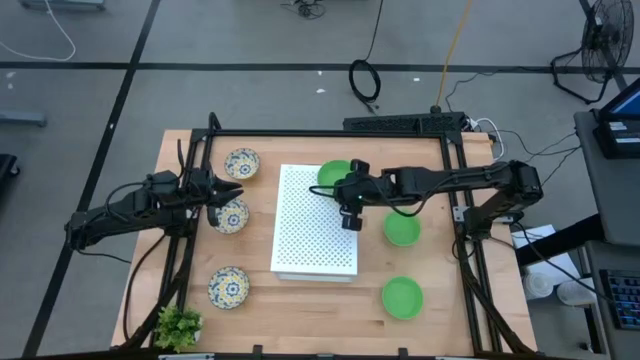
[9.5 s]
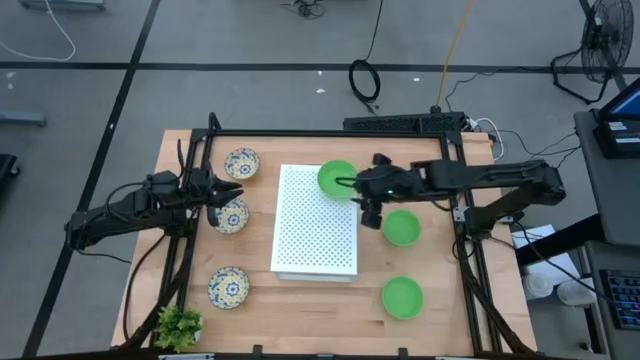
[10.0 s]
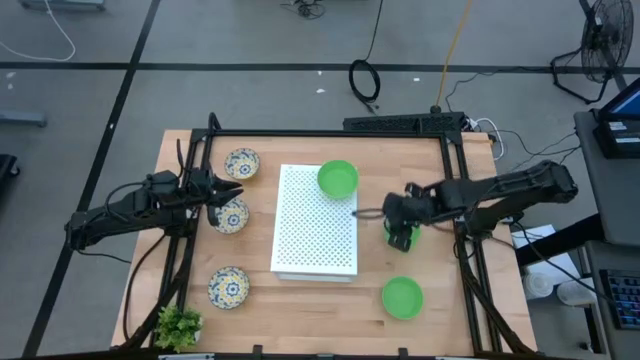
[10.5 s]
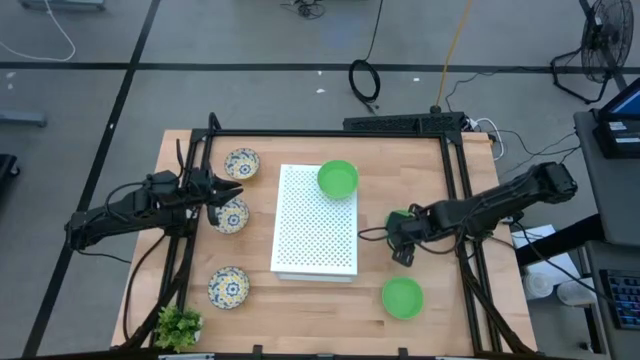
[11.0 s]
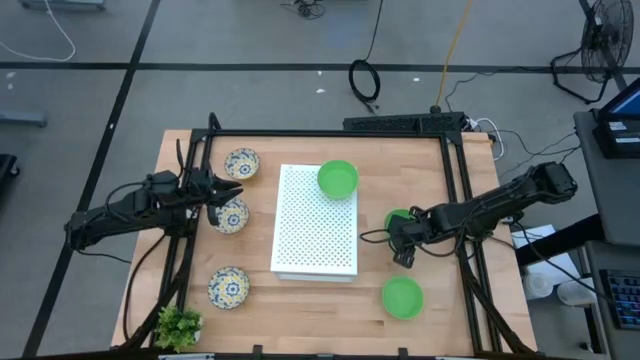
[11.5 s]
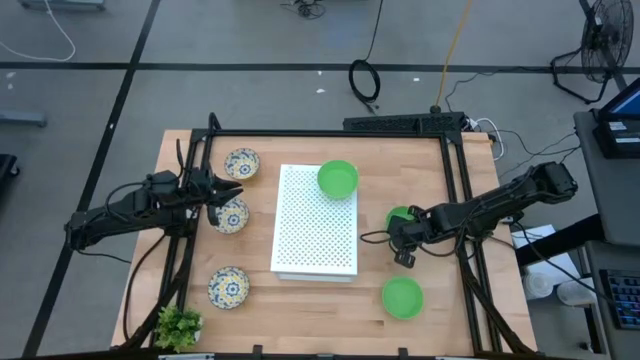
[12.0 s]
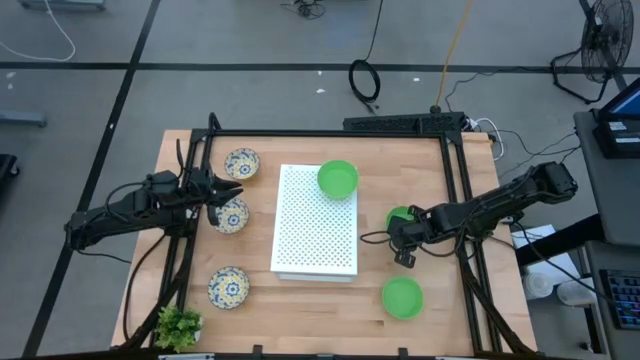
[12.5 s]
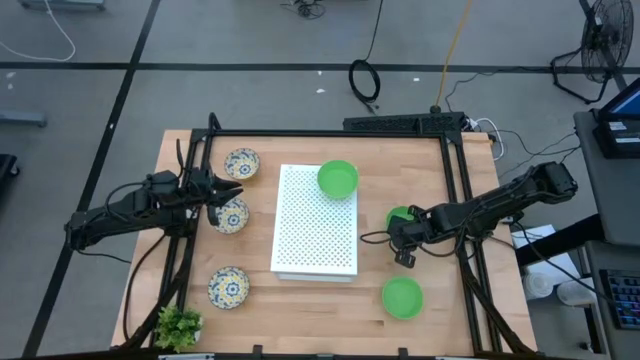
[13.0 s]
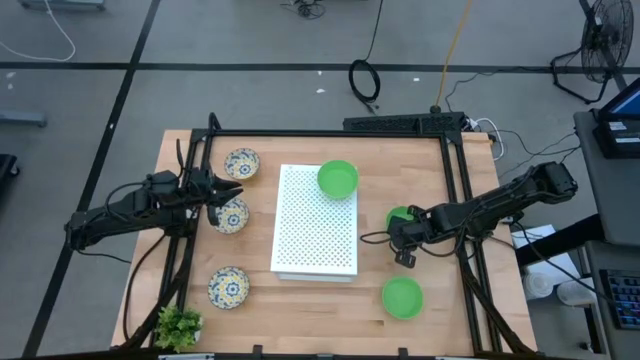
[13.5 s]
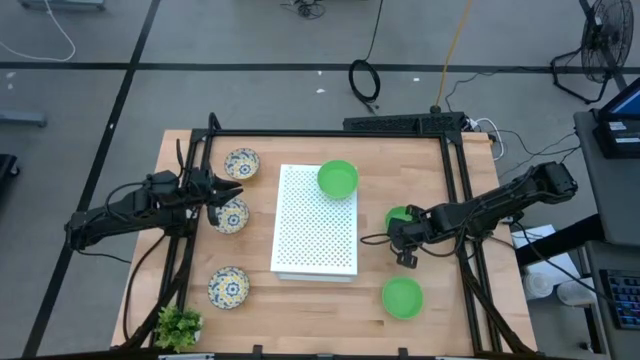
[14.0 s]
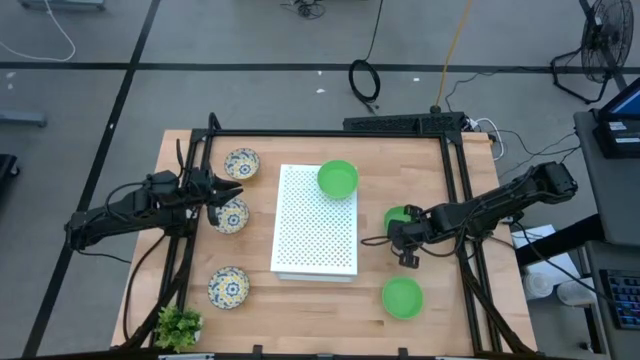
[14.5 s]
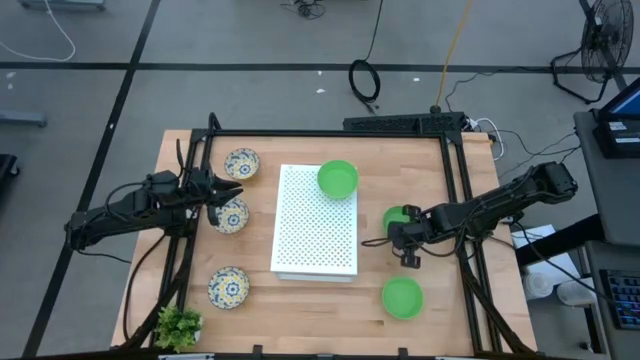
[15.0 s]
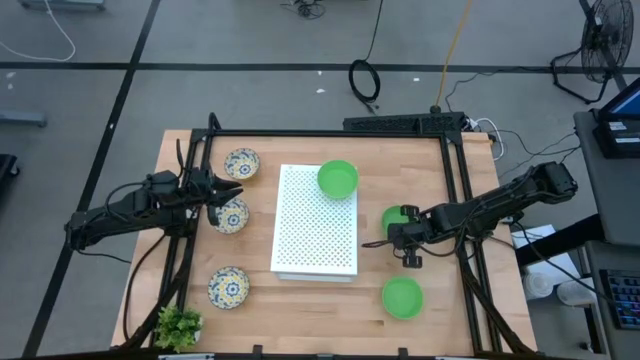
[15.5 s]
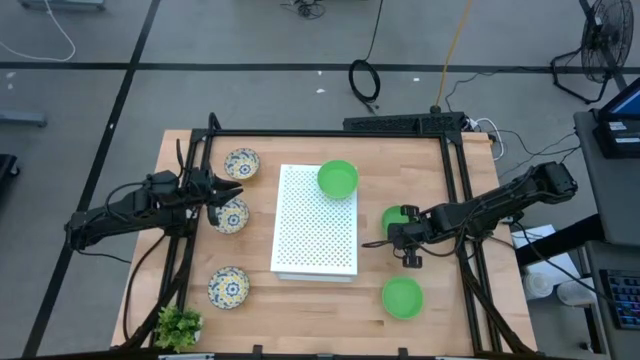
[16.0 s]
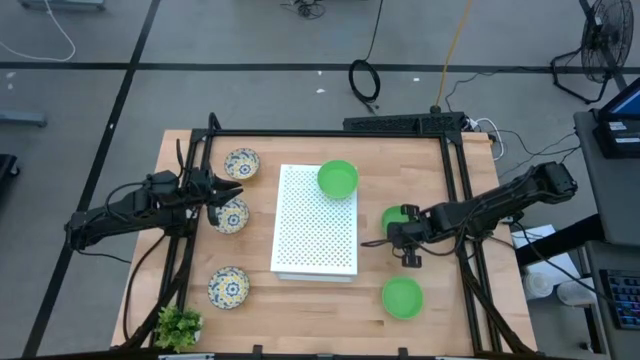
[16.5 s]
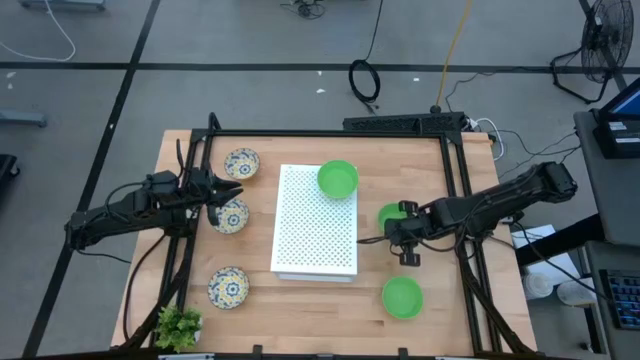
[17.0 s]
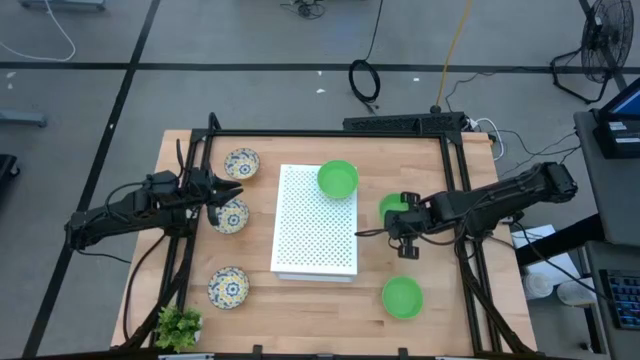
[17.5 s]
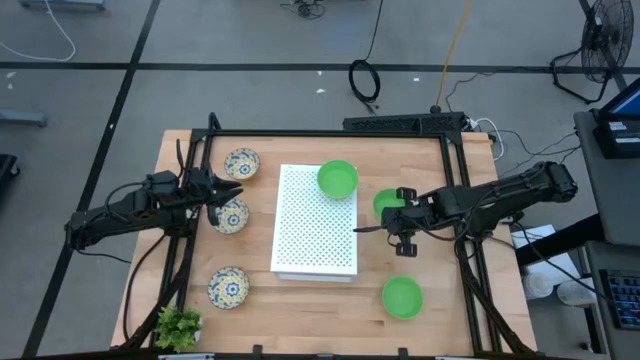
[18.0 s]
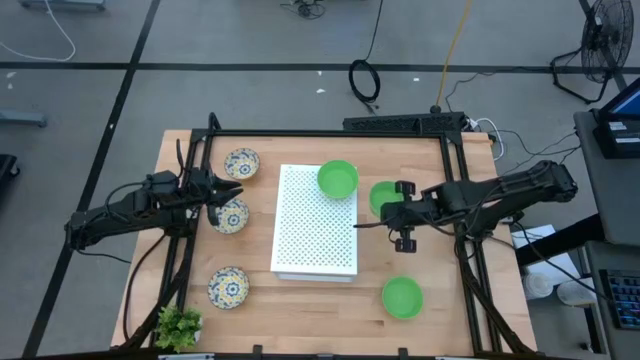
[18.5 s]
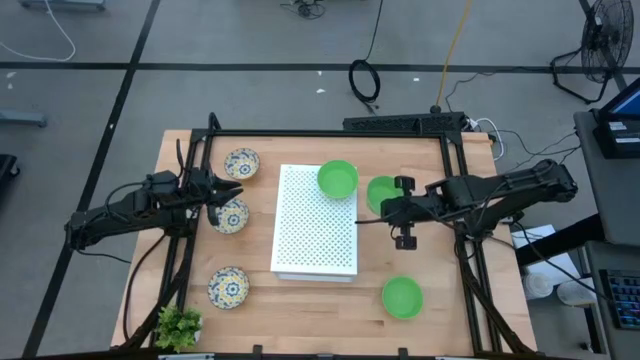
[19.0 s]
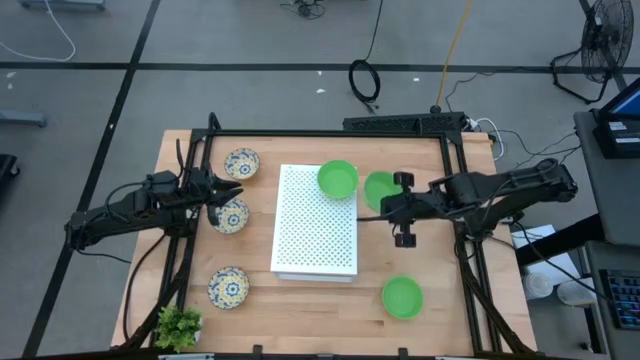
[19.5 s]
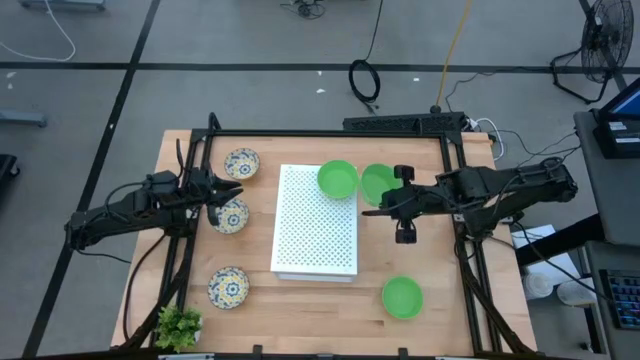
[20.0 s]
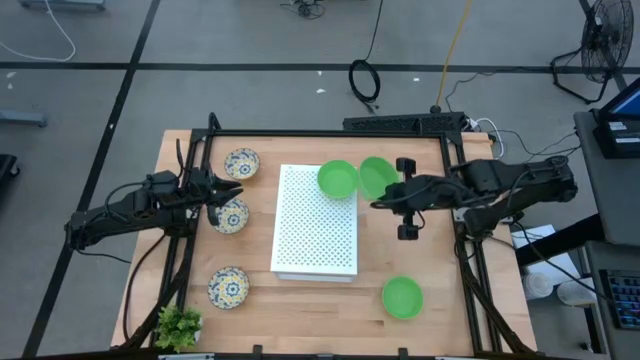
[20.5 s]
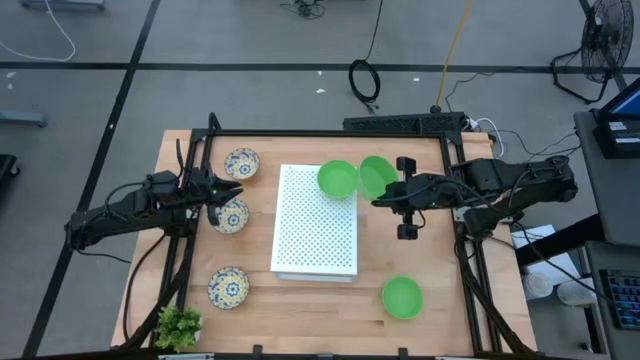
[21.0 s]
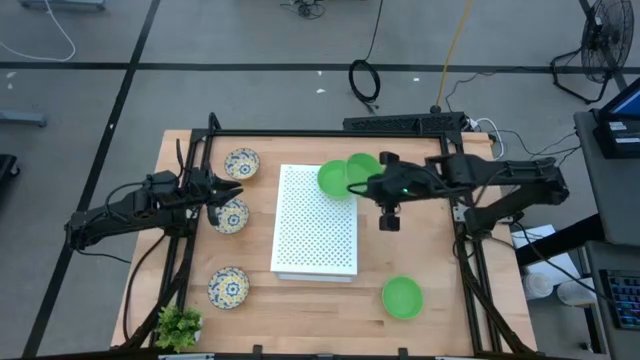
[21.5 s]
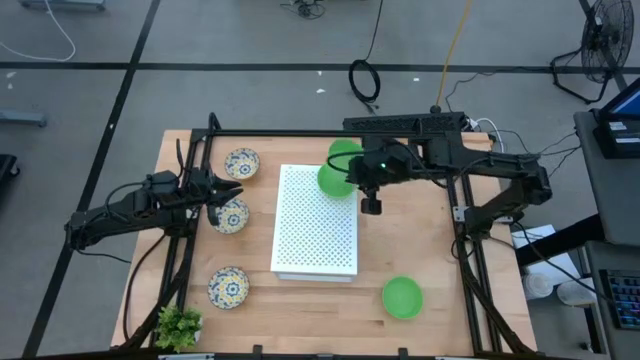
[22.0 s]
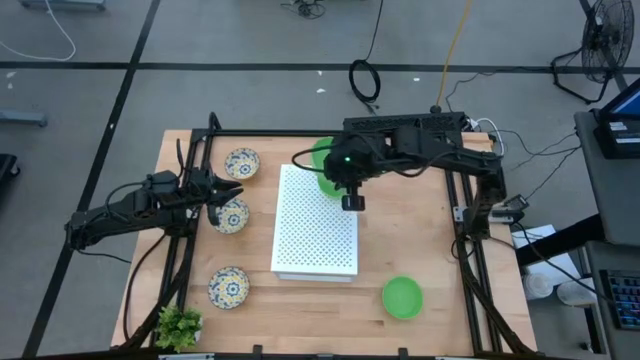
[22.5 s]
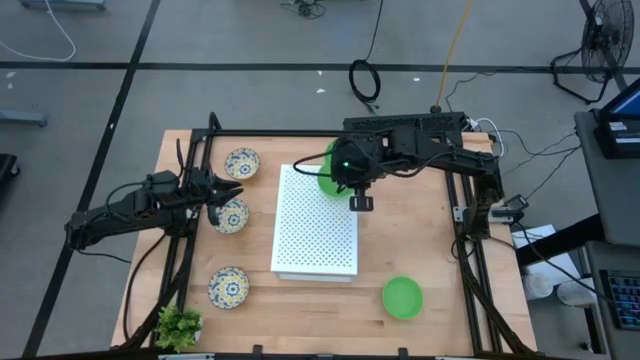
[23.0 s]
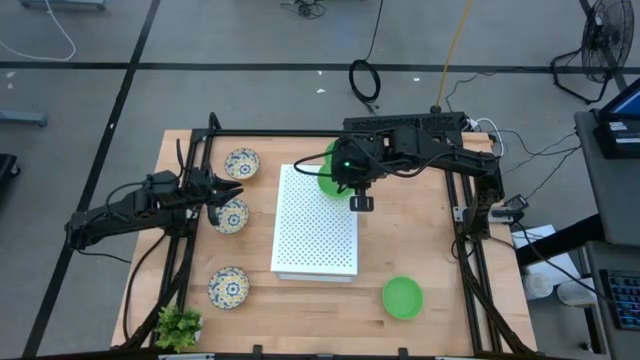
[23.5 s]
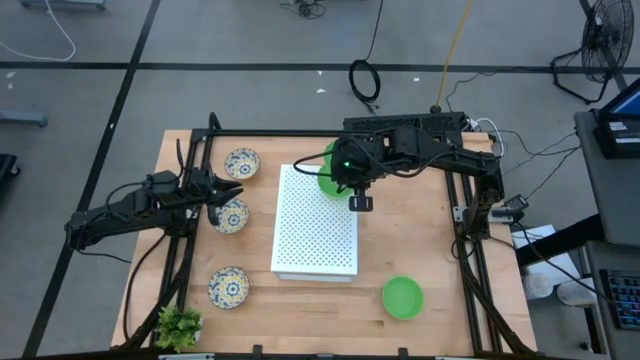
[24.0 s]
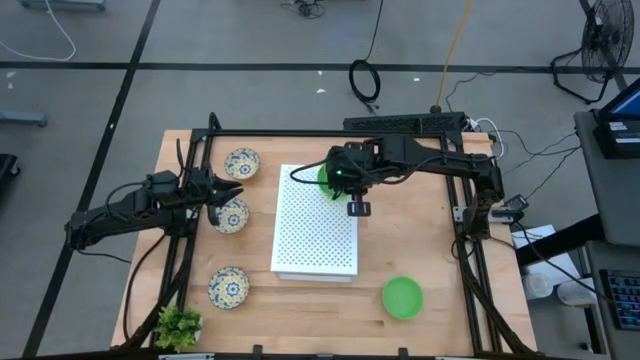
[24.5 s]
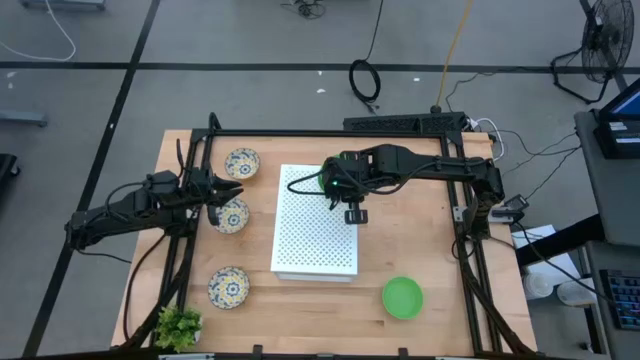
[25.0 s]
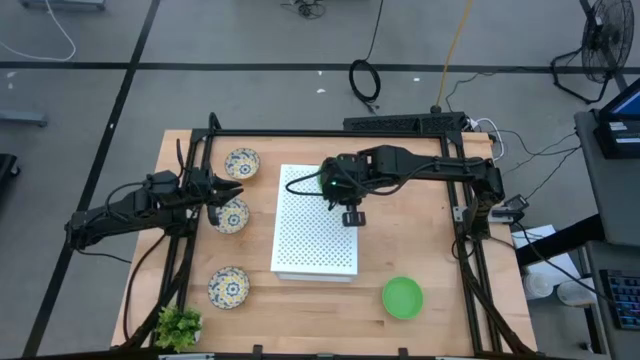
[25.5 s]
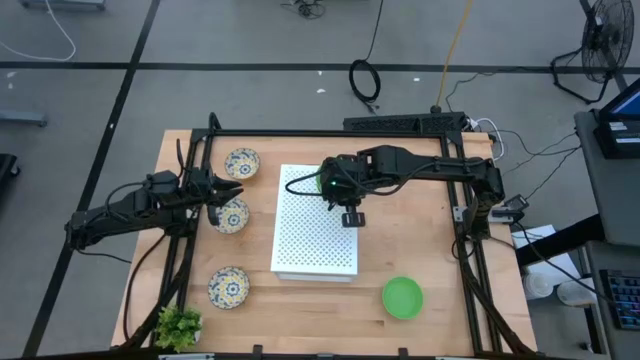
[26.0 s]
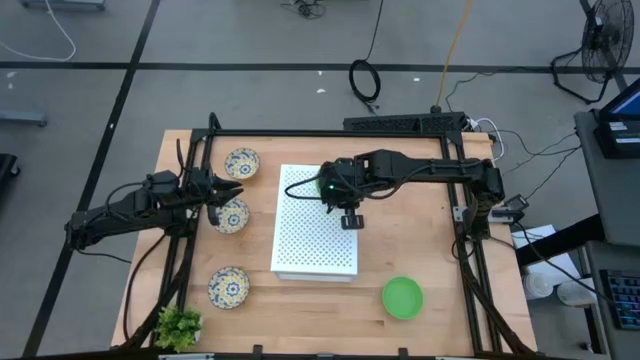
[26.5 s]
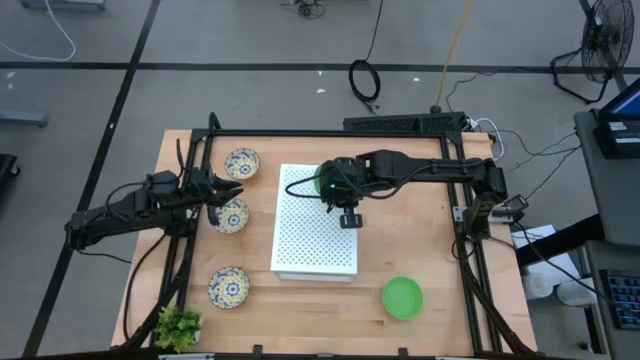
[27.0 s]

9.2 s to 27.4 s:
Task: Pick & Place Mini bowls
Stack the top green bowl on the green bowl on the shelf
